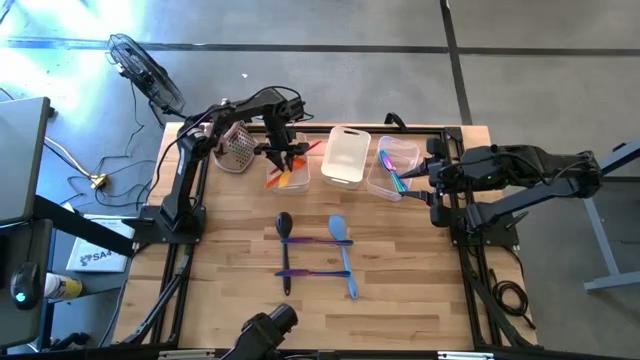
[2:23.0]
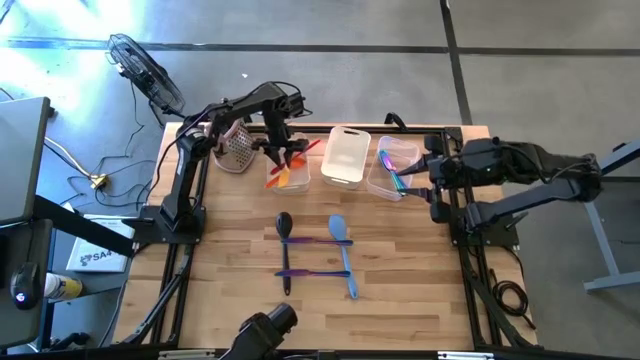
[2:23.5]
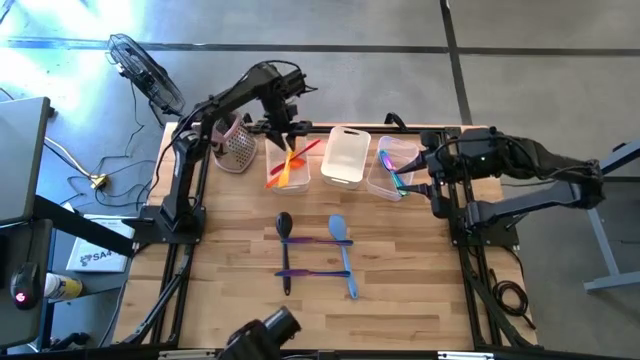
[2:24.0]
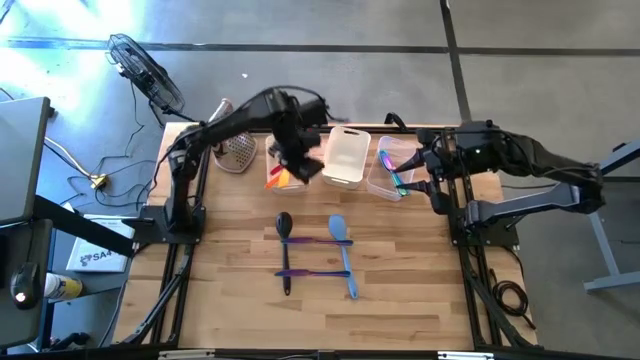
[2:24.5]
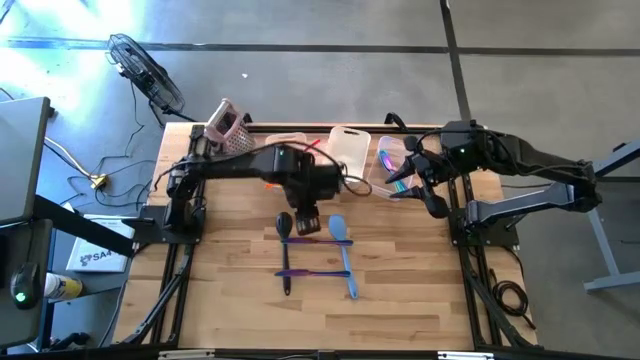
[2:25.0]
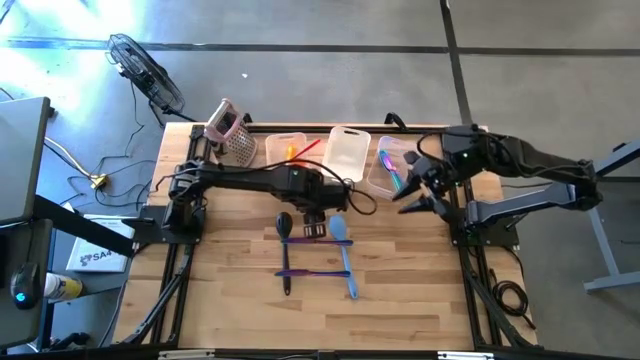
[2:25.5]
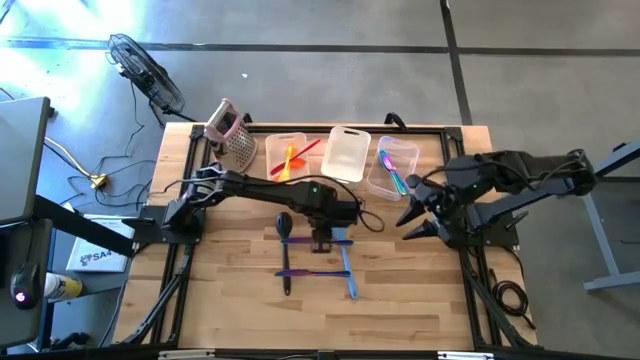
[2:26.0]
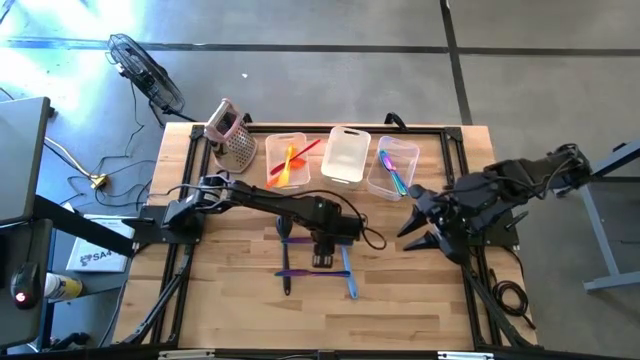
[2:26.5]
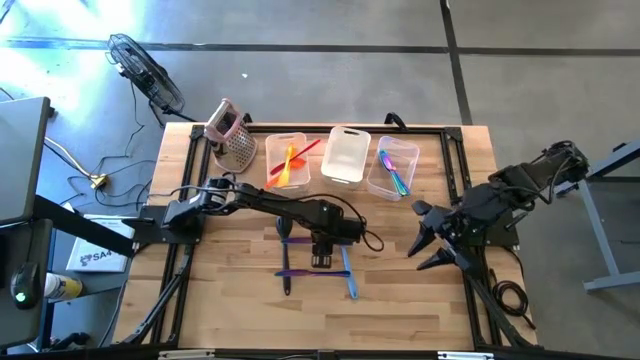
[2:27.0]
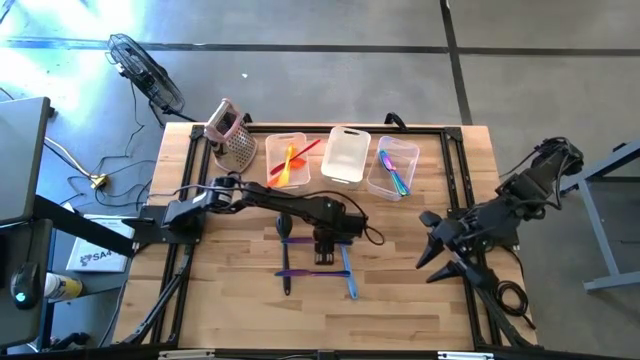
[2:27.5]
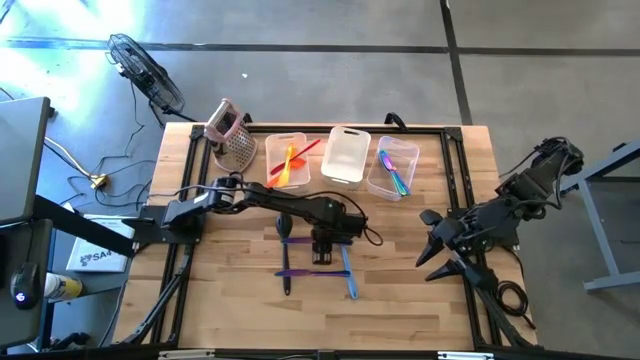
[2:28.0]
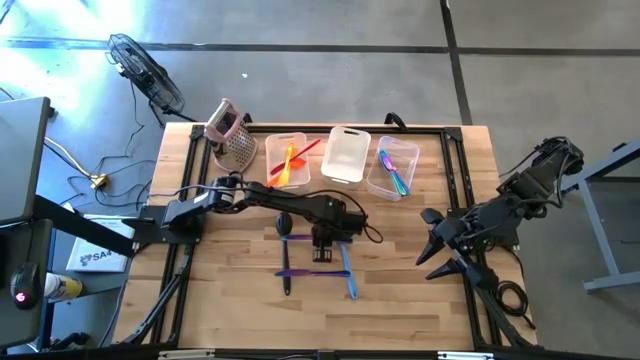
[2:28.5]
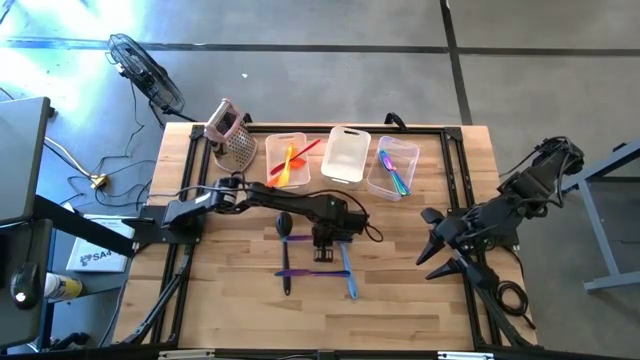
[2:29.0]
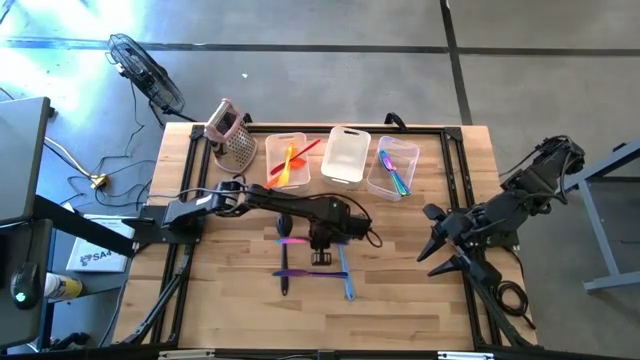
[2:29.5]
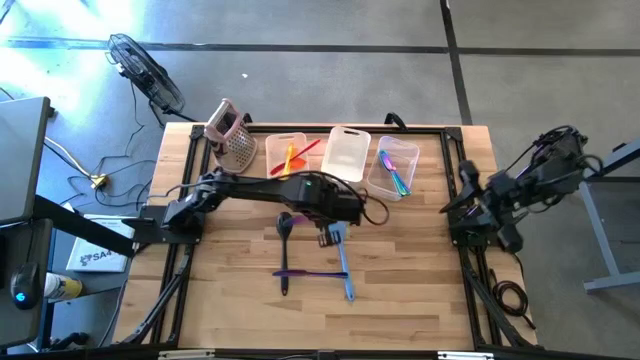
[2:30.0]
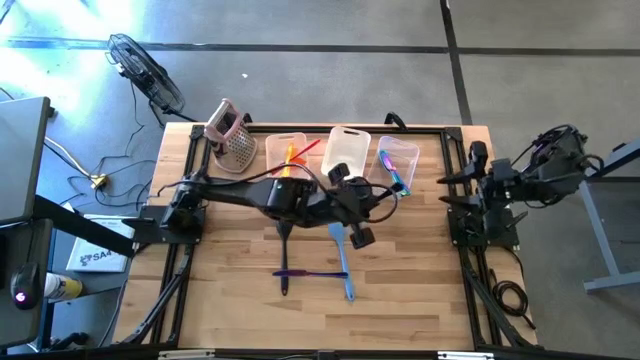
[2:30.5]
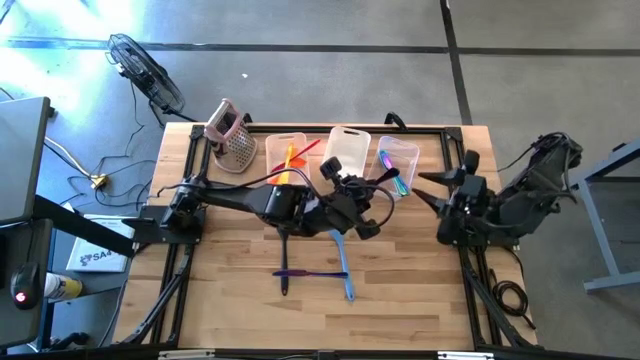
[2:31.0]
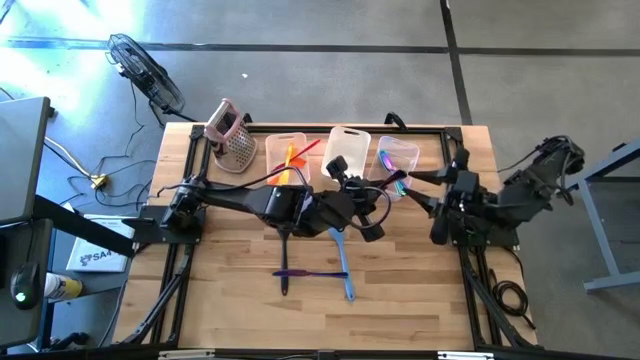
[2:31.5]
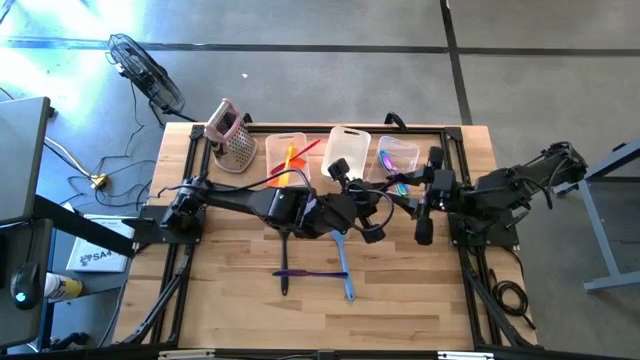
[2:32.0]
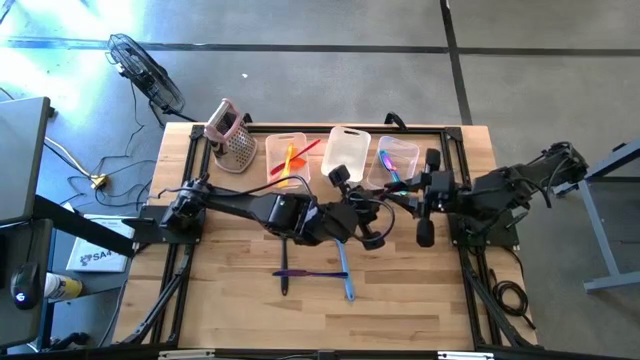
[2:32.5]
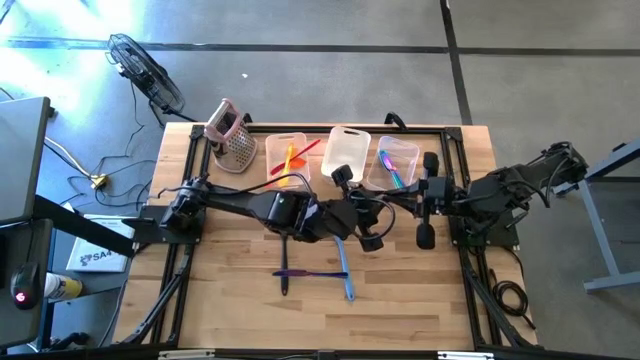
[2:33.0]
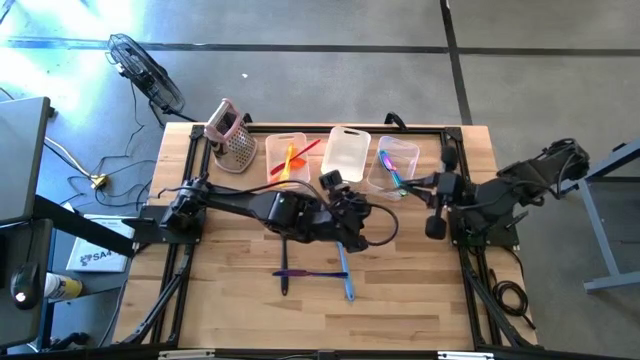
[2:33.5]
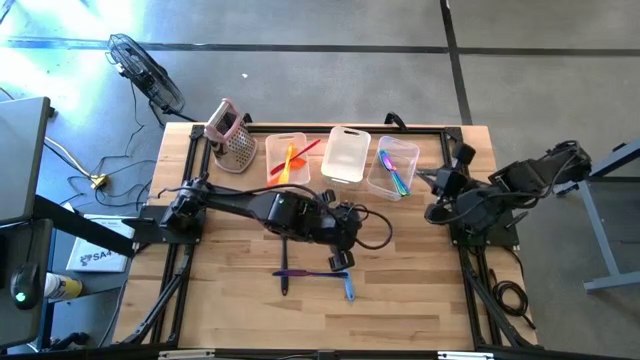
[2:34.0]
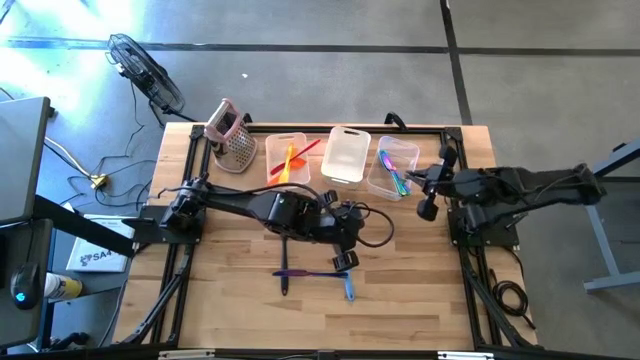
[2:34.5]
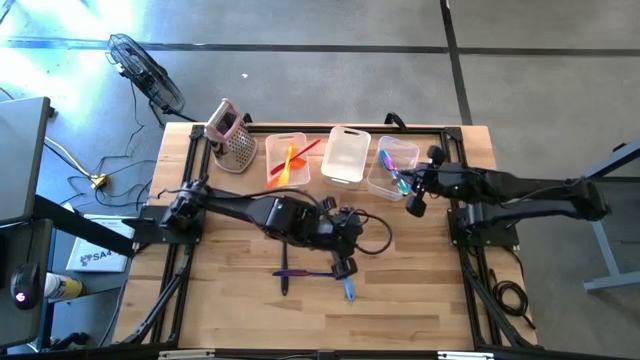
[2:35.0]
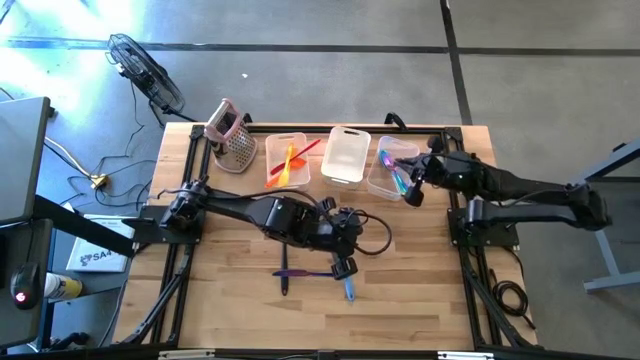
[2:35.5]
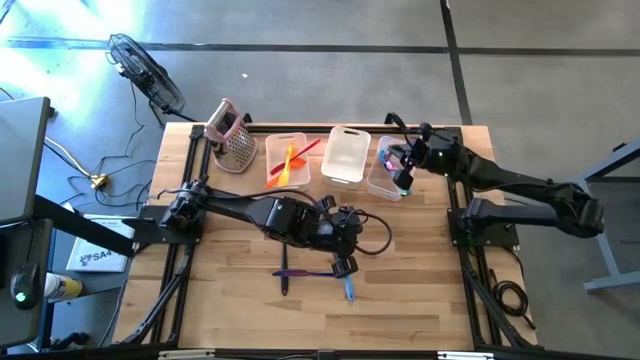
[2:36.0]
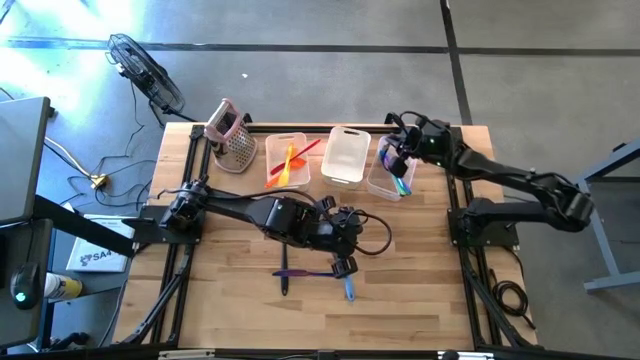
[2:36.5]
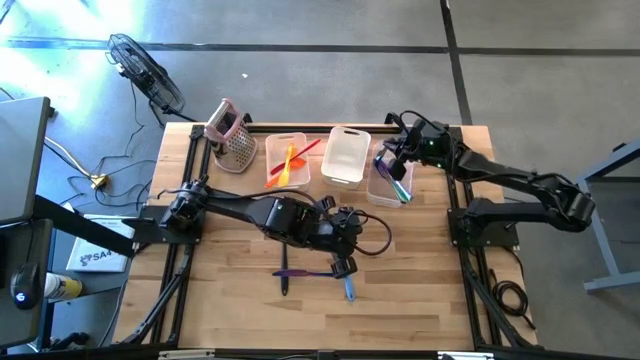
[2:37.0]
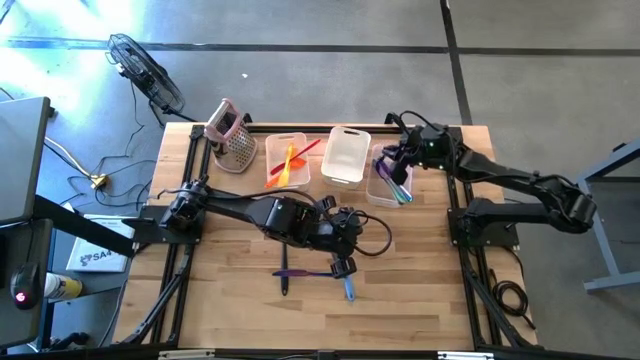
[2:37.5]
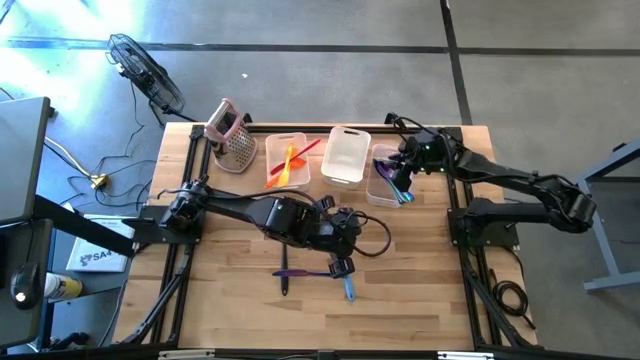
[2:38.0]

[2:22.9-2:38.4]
Task: Pick & Place Kitchen Items
Put the blue table knife into the transparent bin

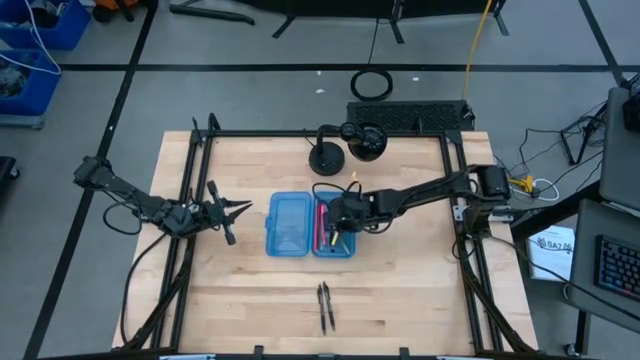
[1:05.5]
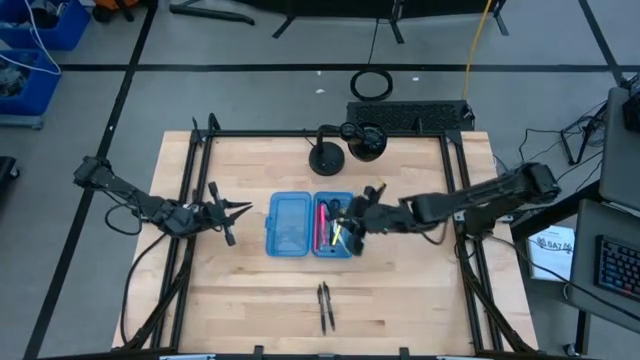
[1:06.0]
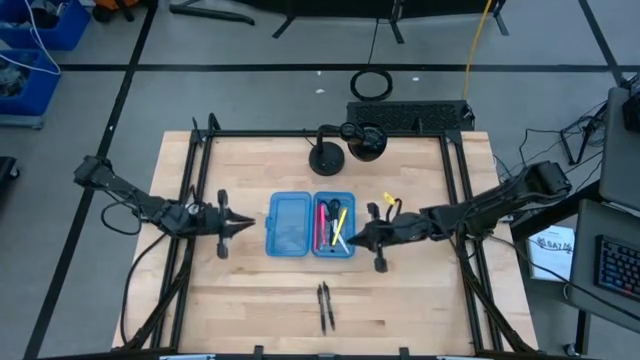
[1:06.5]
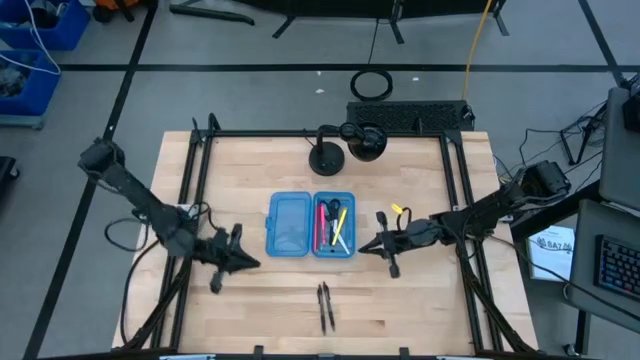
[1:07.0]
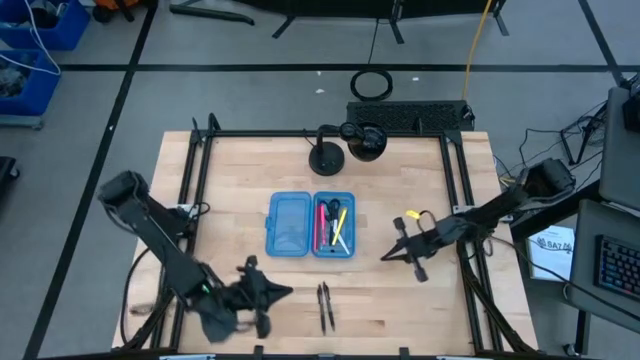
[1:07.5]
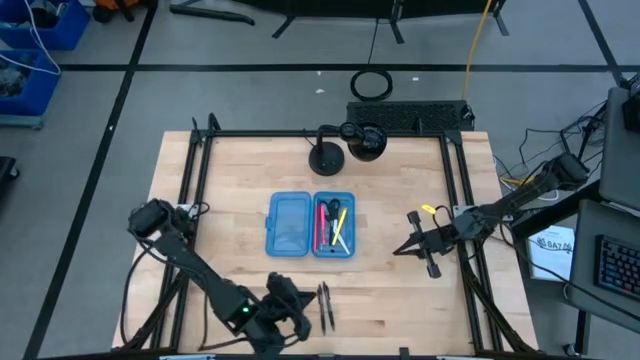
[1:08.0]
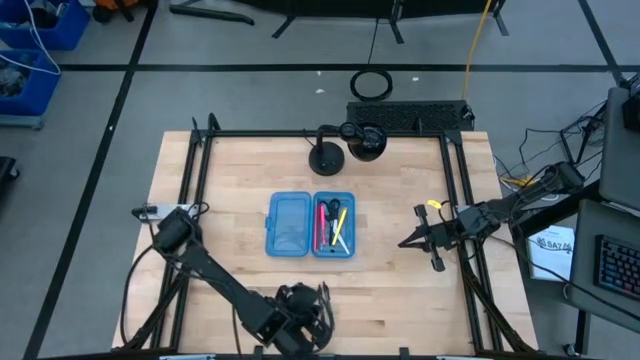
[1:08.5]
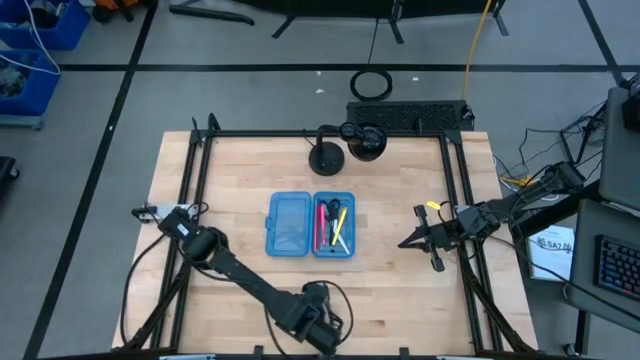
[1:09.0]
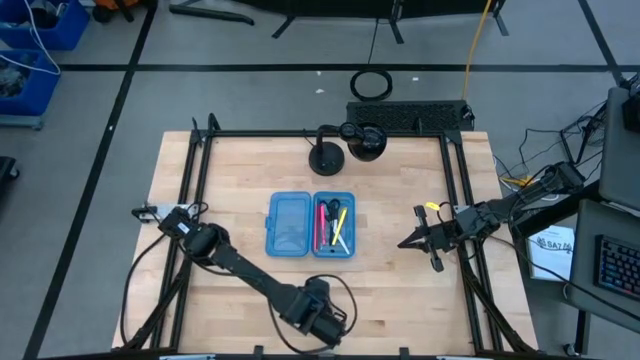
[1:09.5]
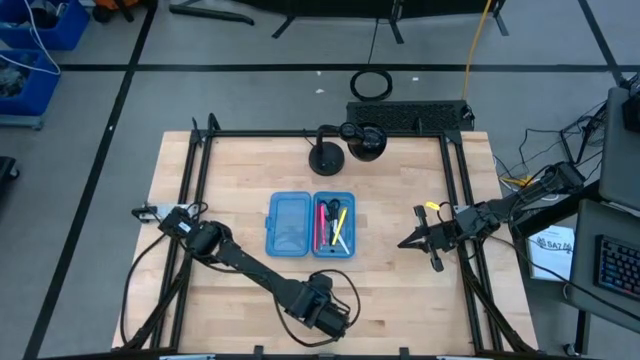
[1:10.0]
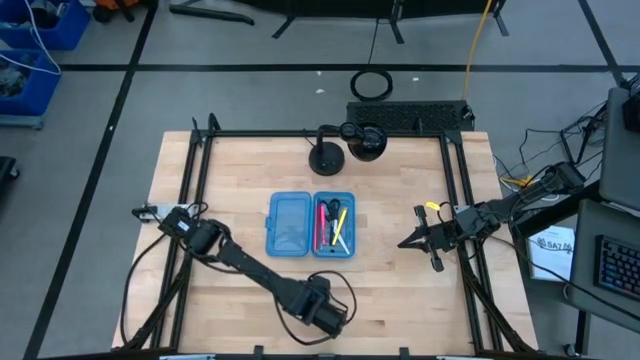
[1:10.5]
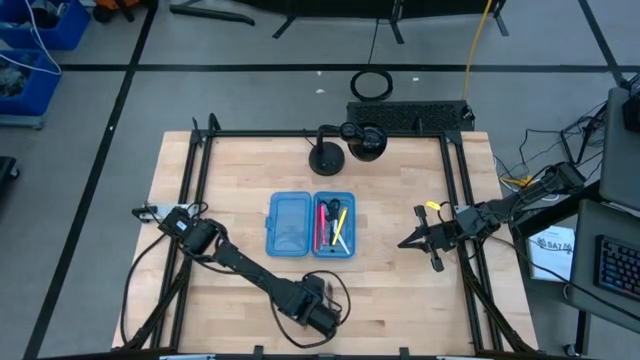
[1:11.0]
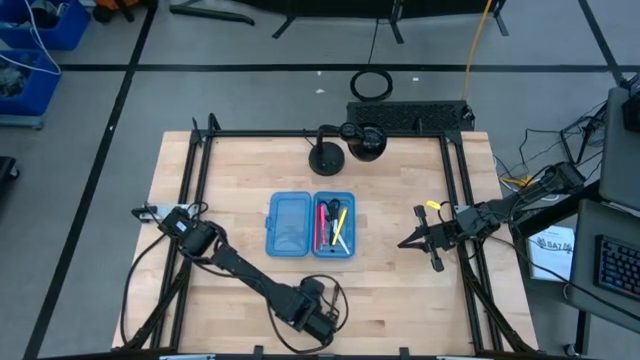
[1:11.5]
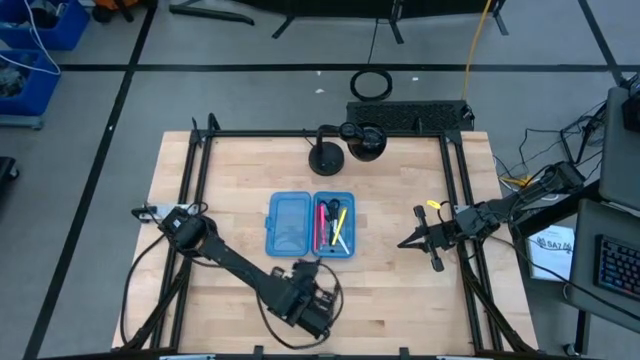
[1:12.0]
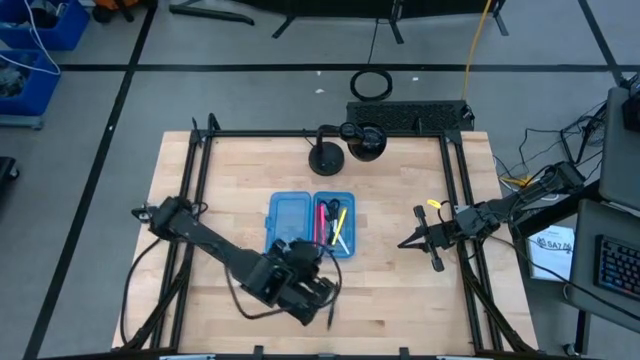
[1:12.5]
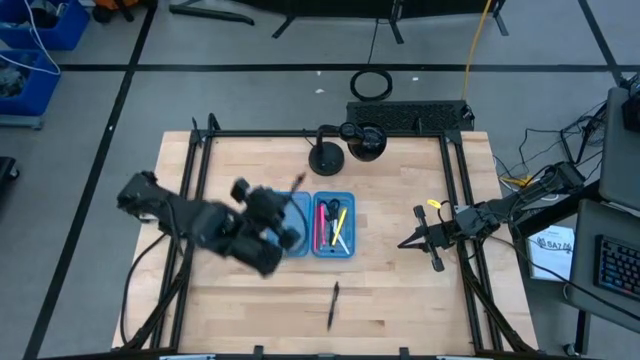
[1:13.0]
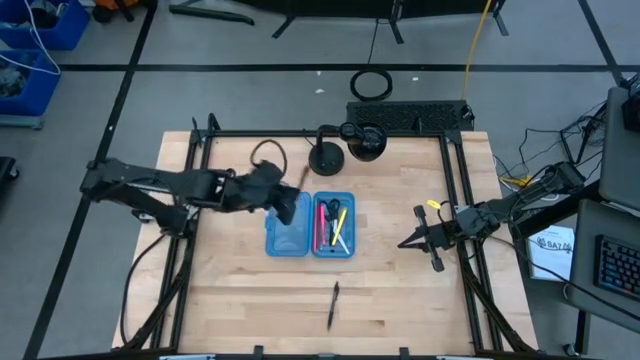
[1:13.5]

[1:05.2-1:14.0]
Task: Pick & place school supplies into a supply box
Put the left black pen into the blue supply box
